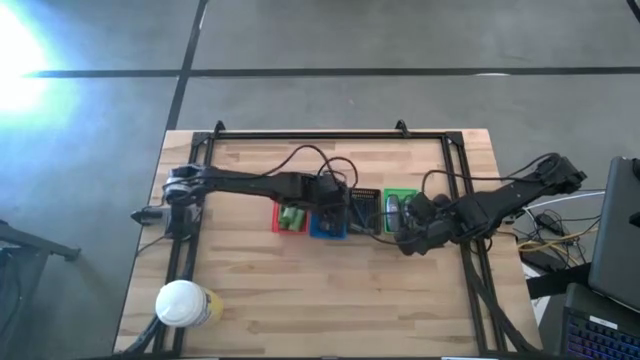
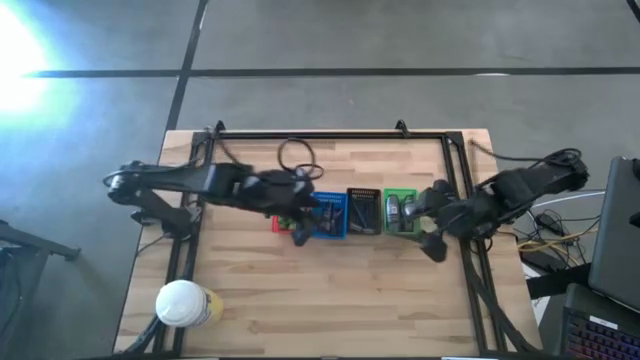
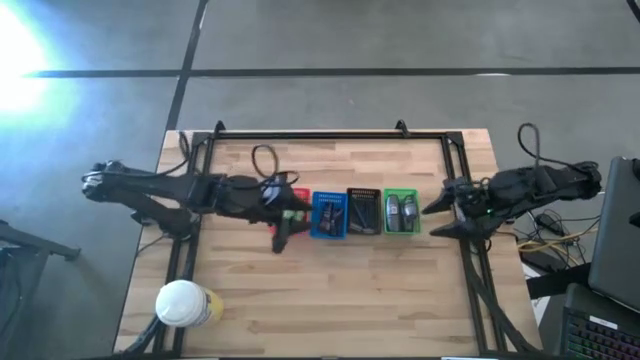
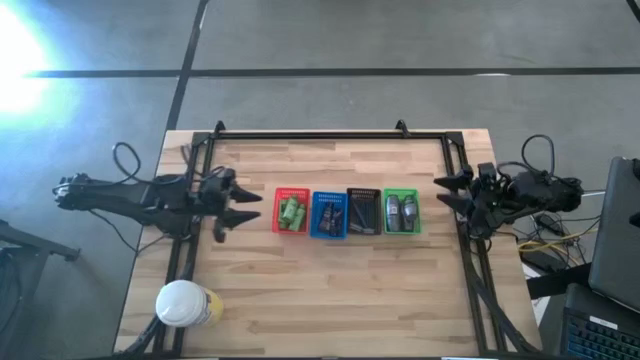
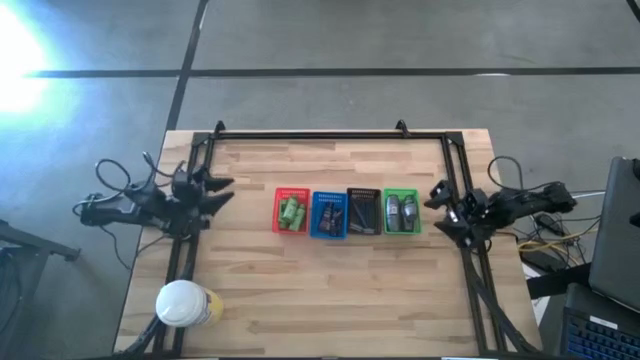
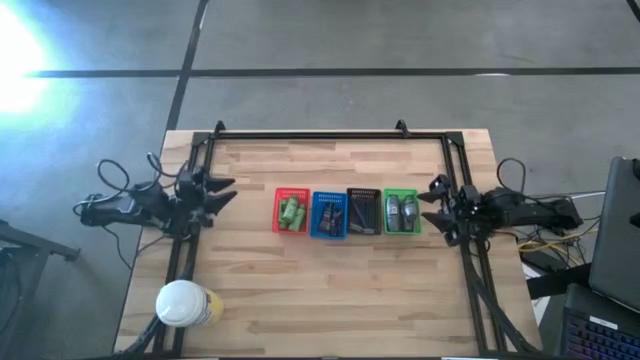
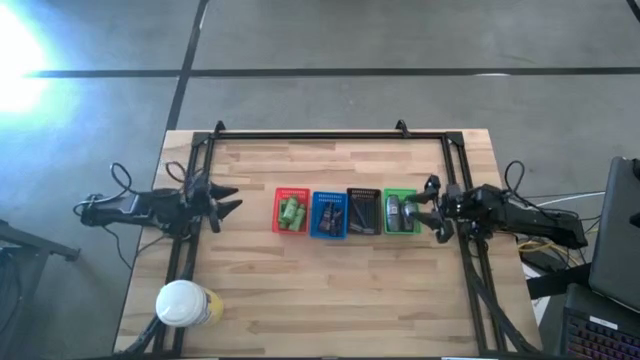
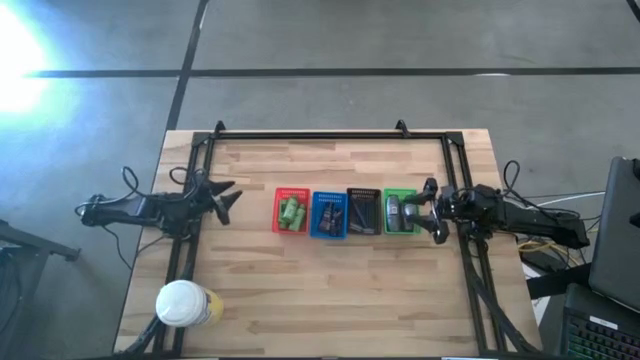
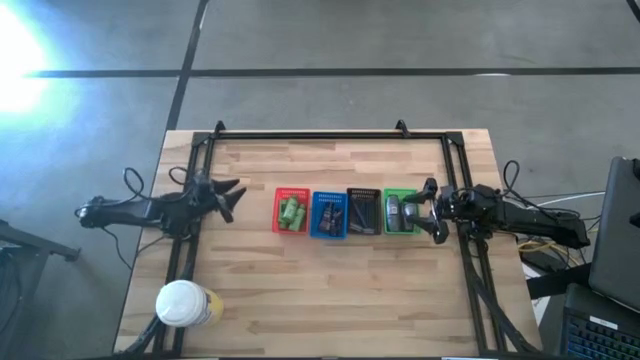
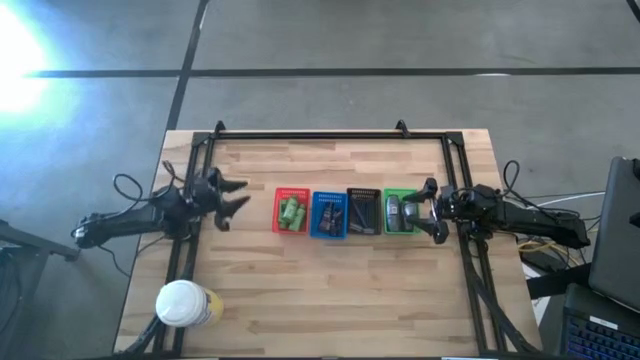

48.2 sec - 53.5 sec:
Task: Pick & Place Travel size toiletries
Return to Home Position

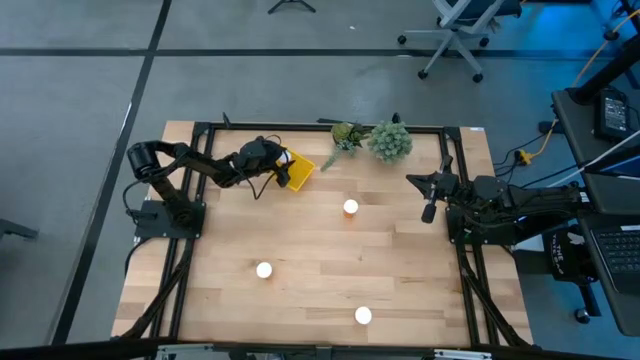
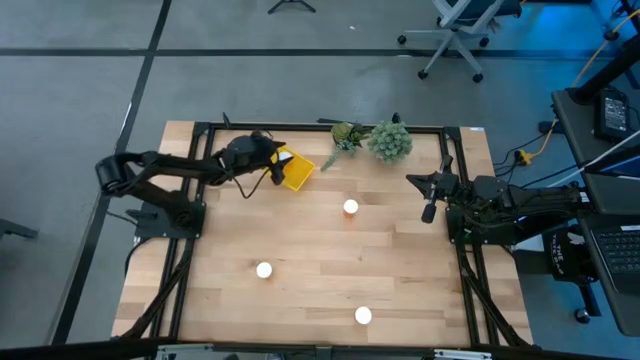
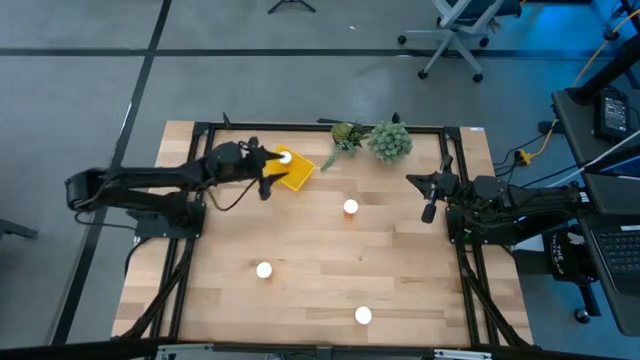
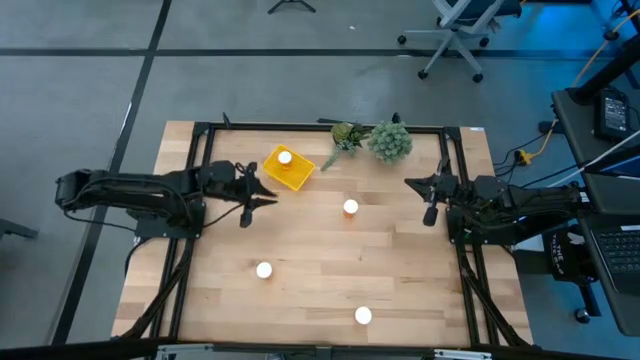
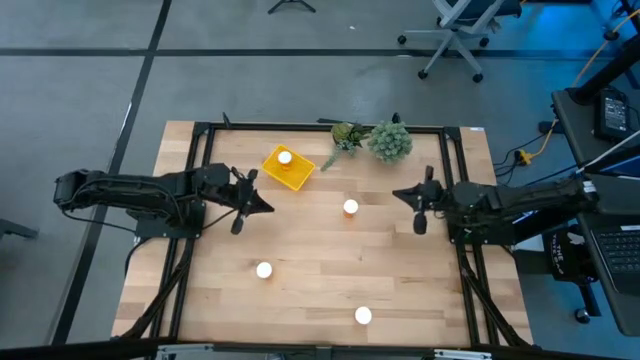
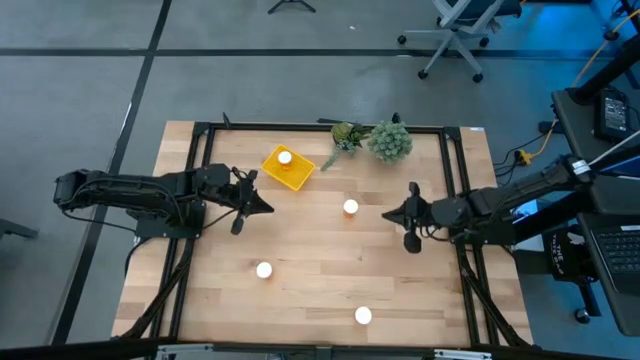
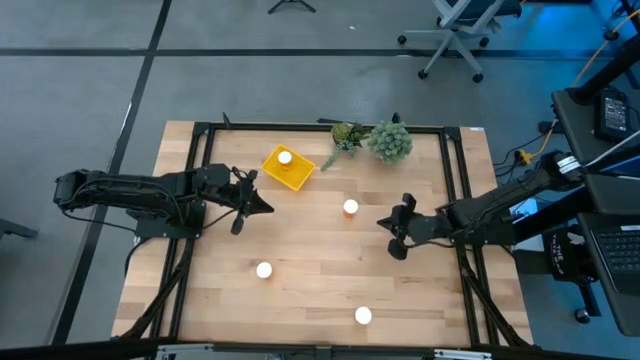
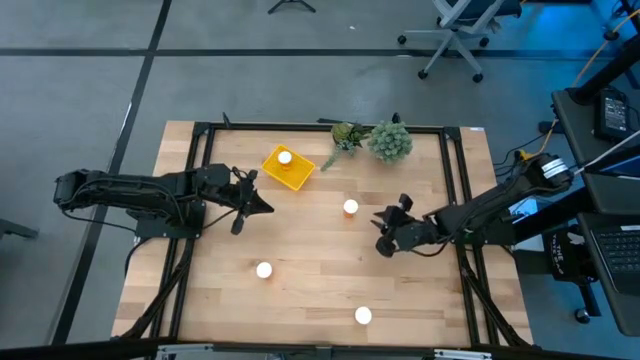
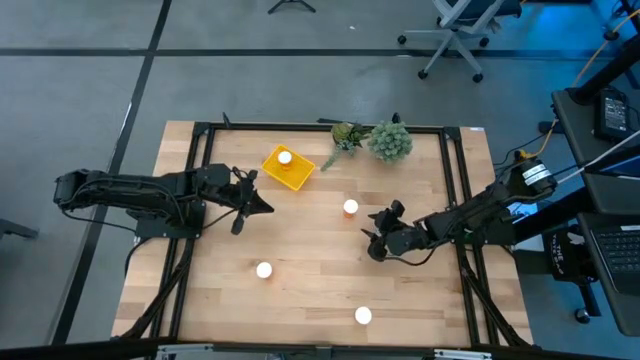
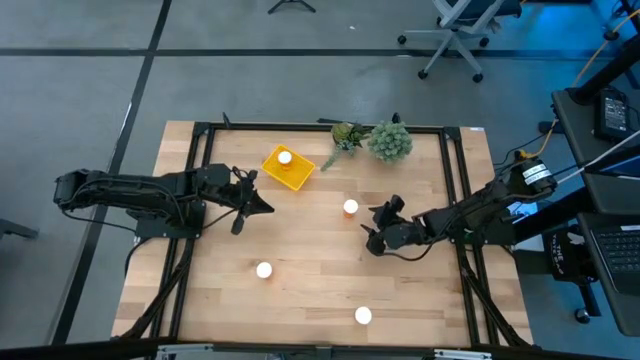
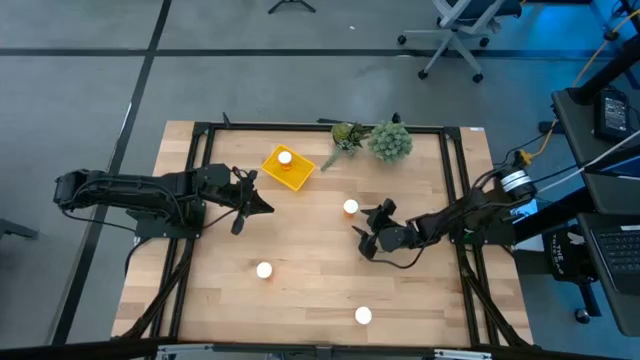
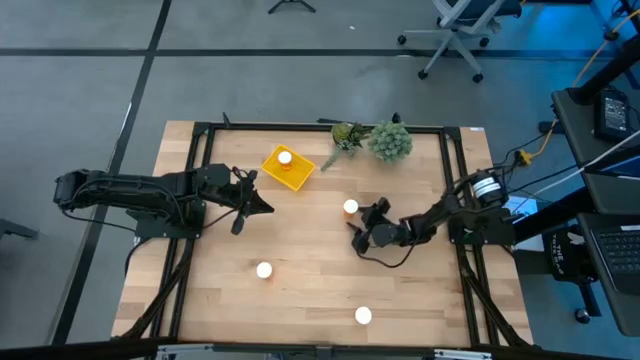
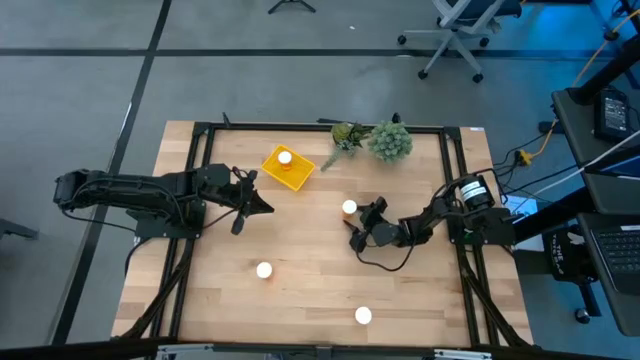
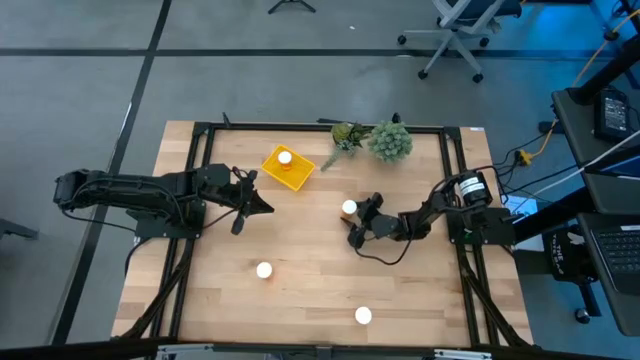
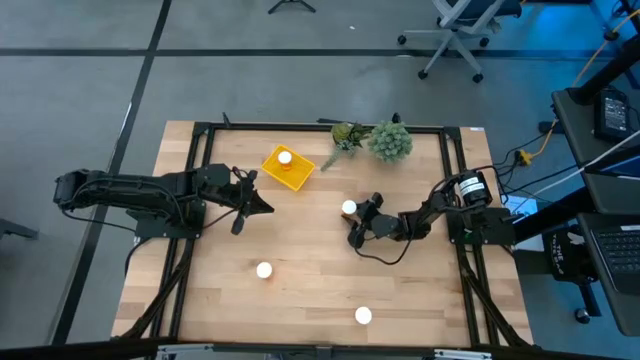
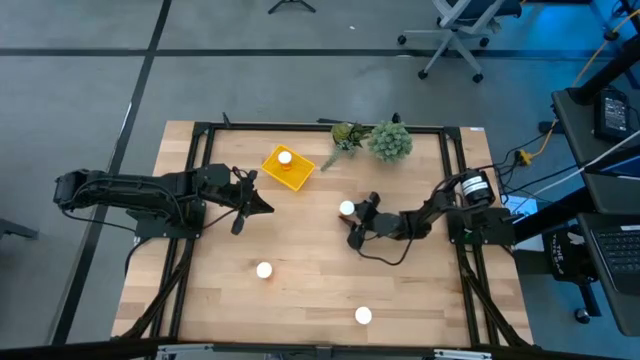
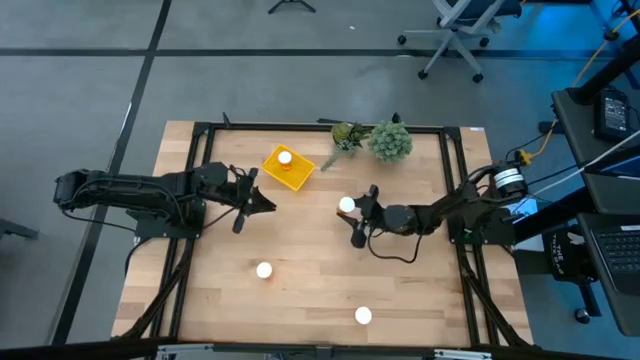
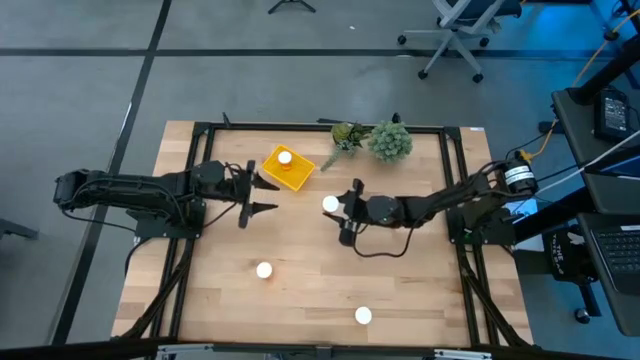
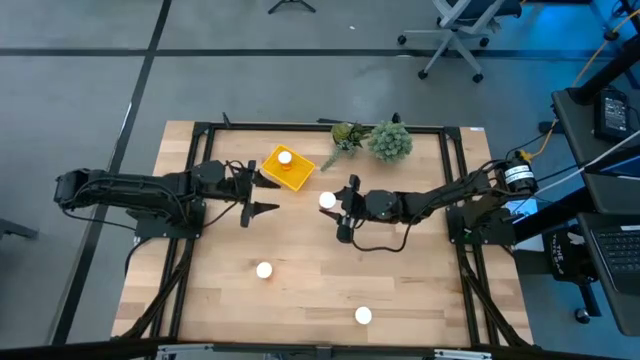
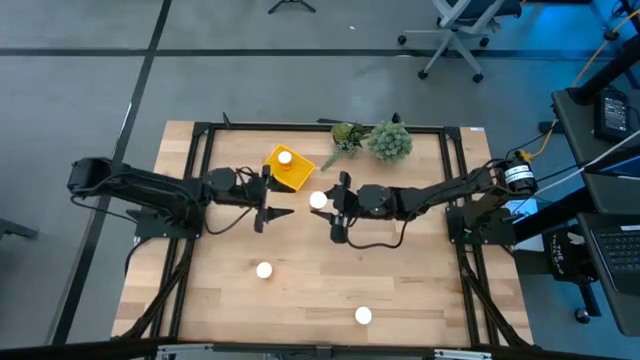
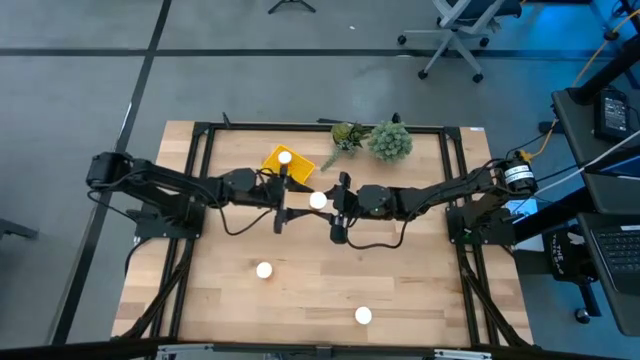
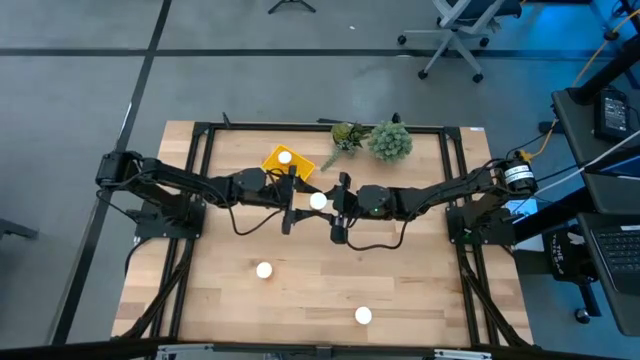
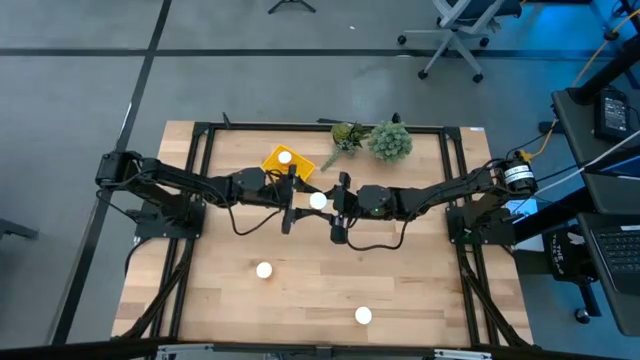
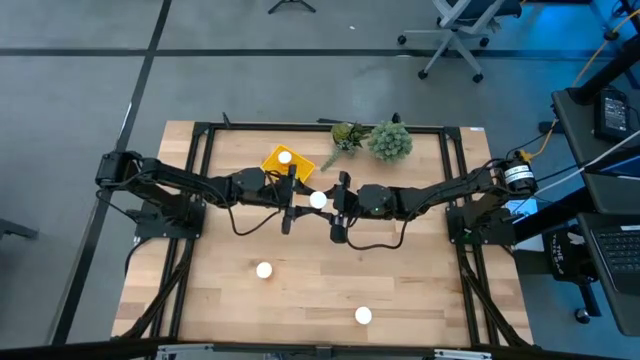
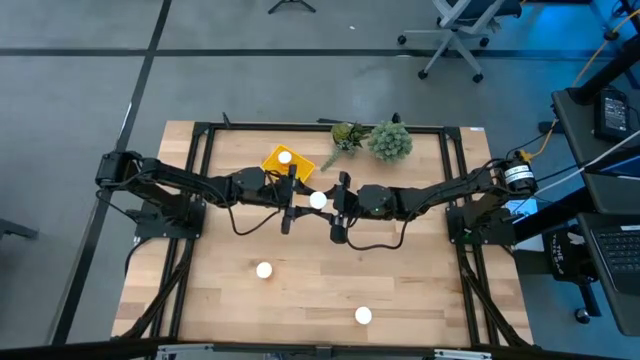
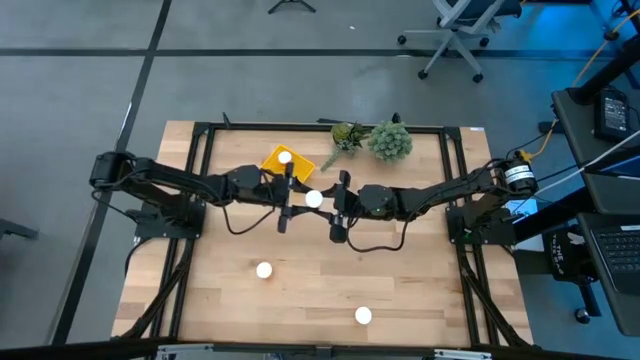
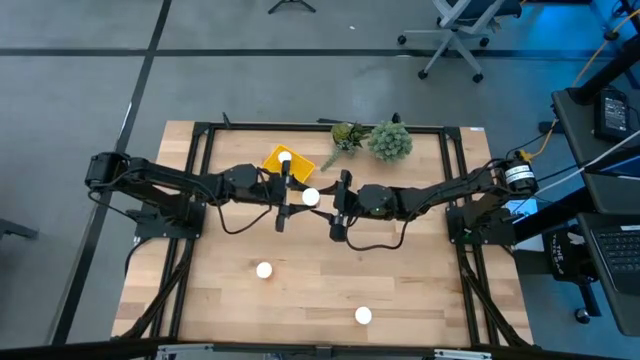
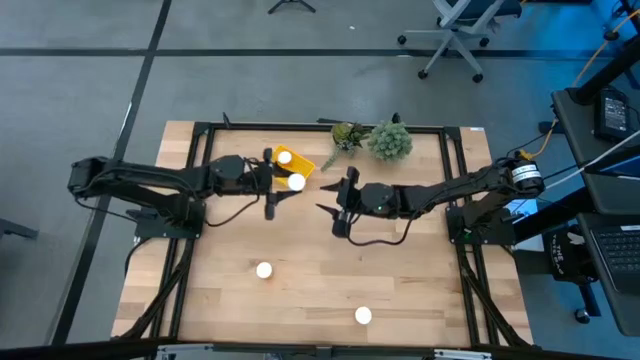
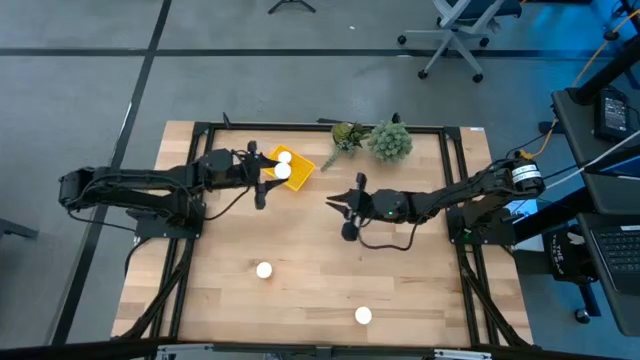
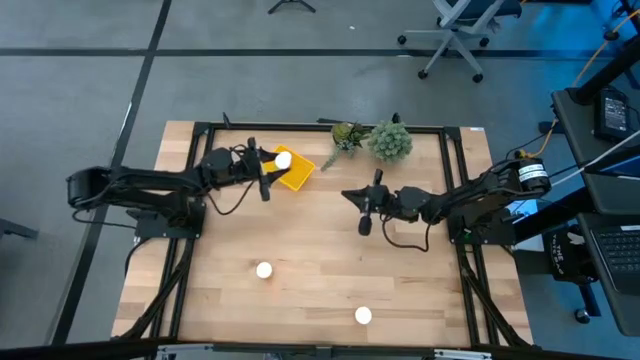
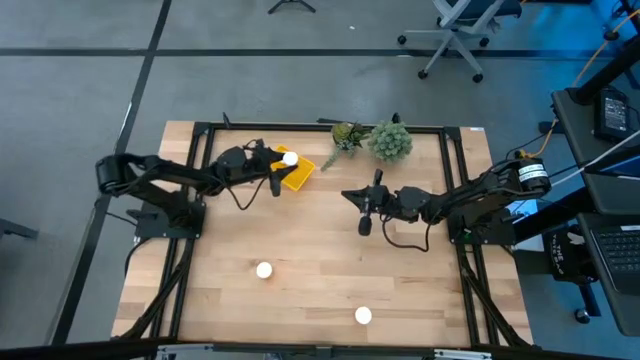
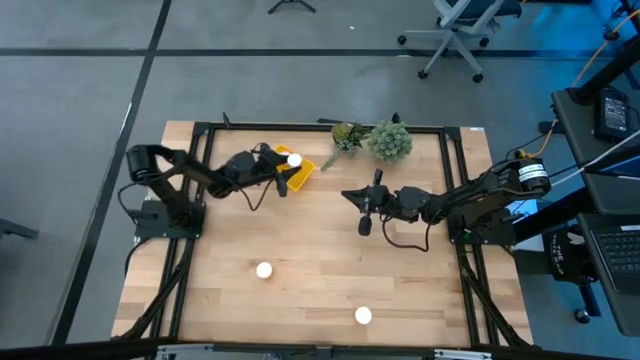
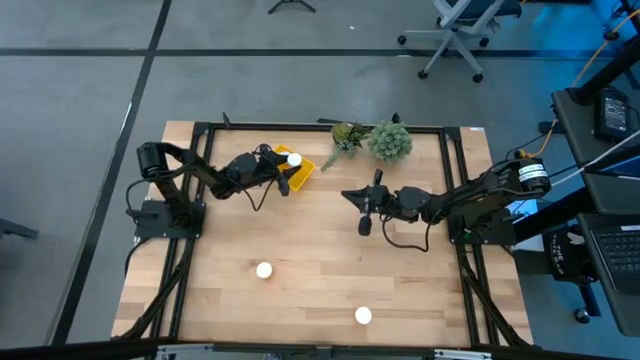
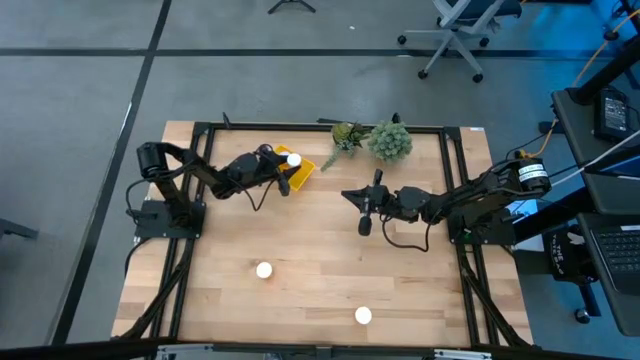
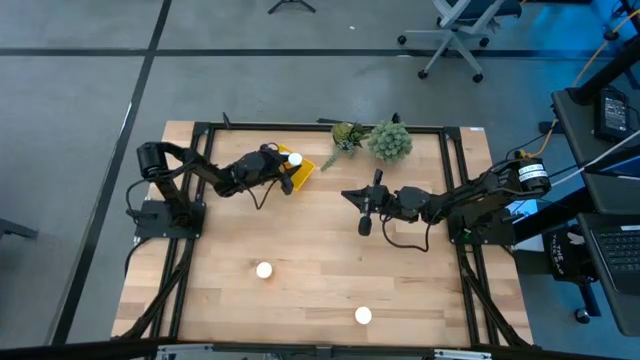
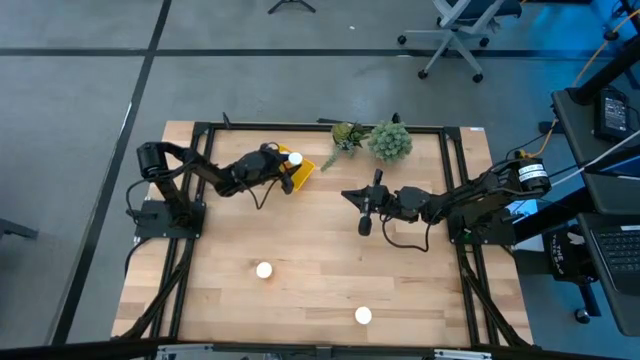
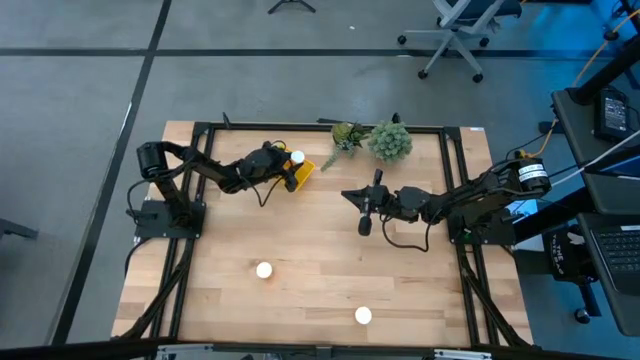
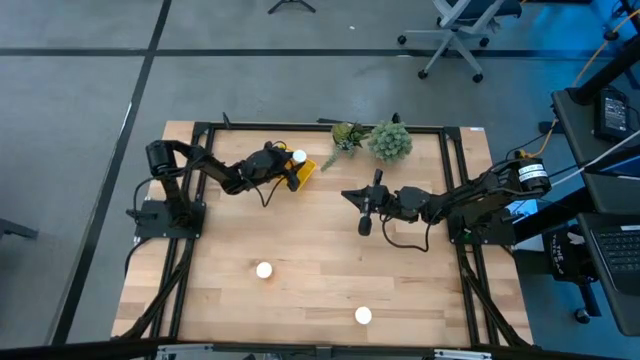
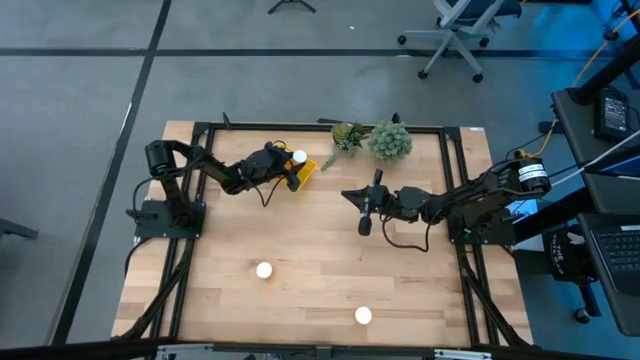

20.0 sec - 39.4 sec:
Task: Pick and place pill bottles into a basket
Put the top right orange pill bottle into the yellow bin
